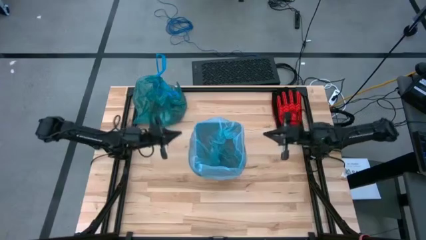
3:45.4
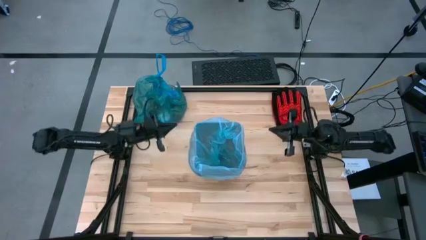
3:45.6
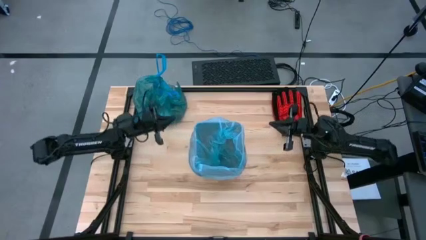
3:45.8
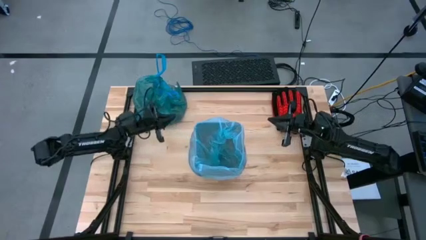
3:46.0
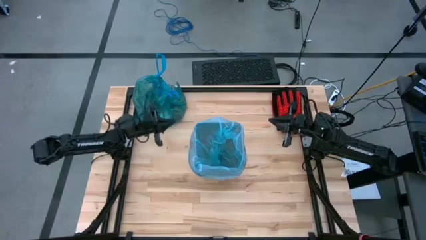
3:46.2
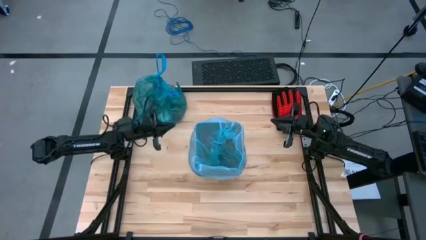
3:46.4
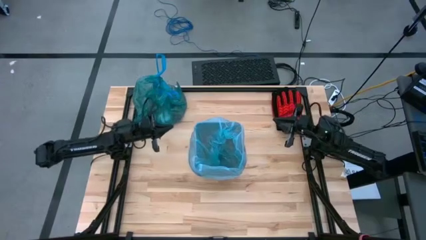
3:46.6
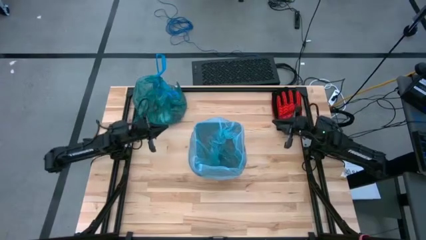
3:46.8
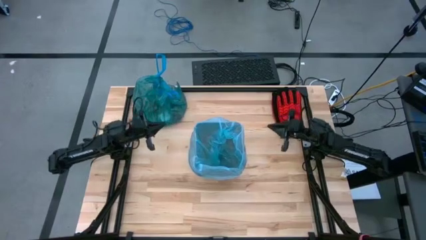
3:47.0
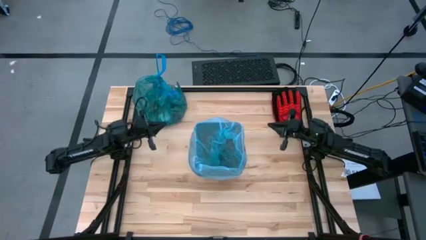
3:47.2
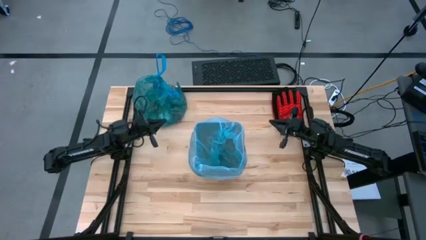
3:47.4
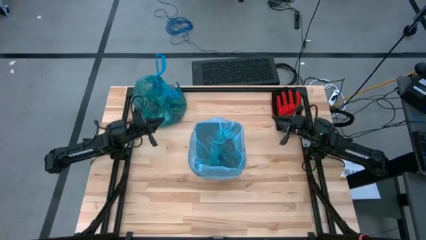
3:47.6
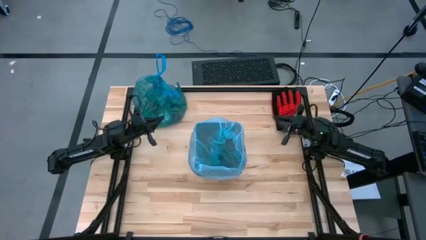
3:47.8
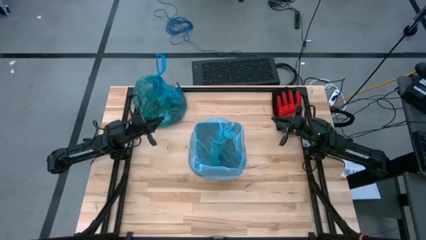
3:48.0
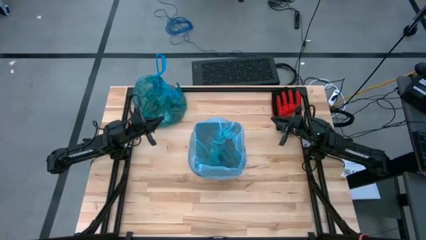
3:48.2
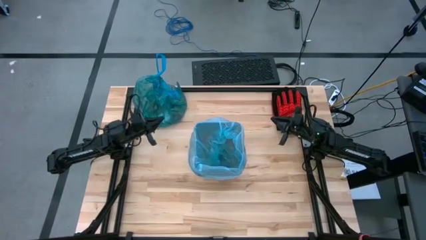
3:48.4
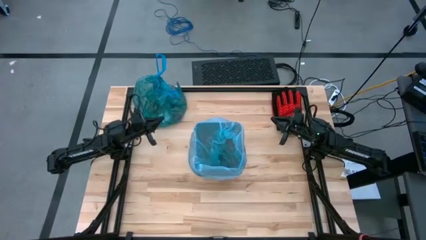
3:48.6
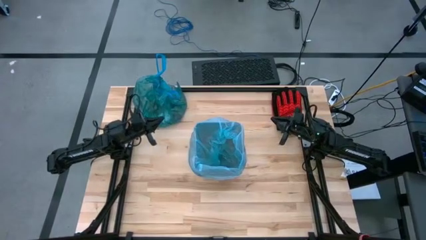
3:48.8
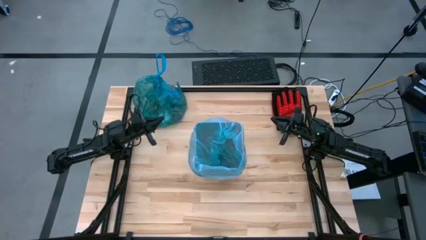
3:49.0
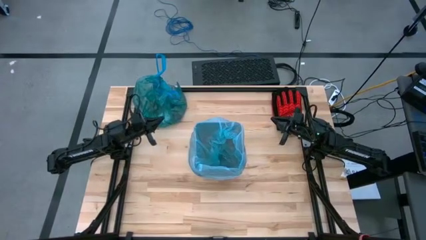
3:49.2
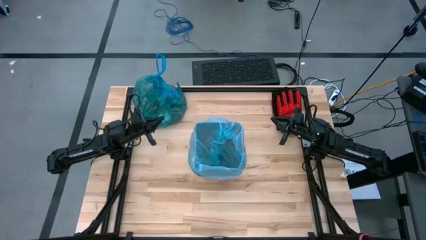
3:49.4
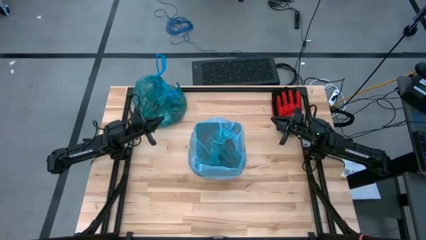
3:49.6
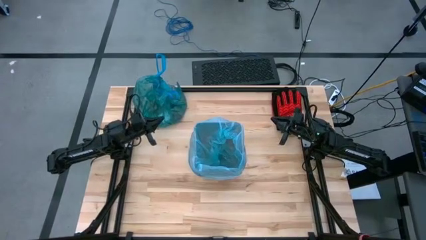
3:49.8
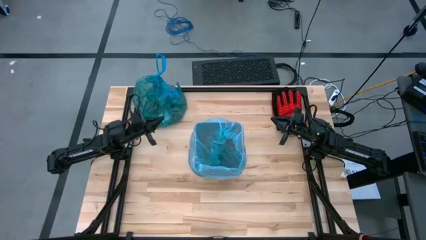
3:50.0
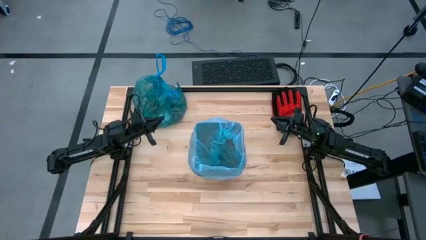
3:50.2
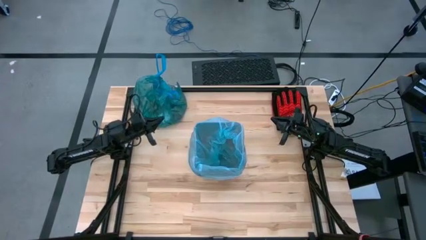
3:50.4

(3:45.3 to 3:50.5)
Task: place trash/remove bag and relplace
Return to Home Position

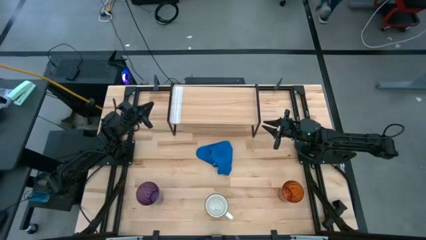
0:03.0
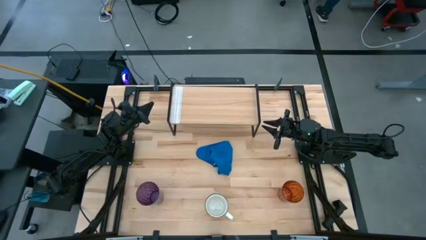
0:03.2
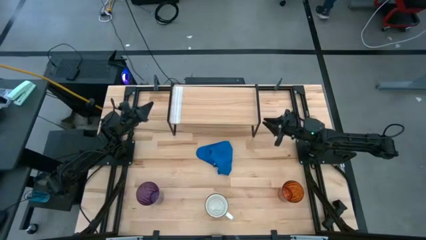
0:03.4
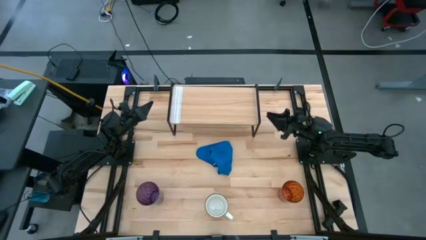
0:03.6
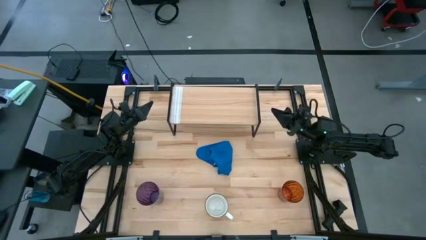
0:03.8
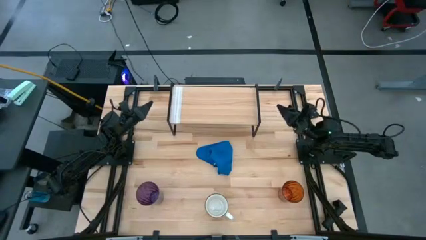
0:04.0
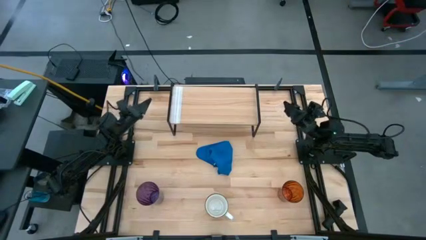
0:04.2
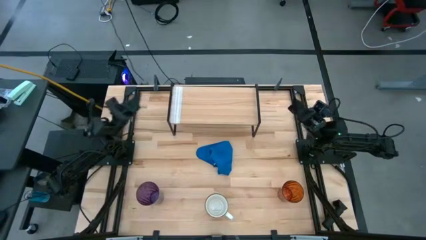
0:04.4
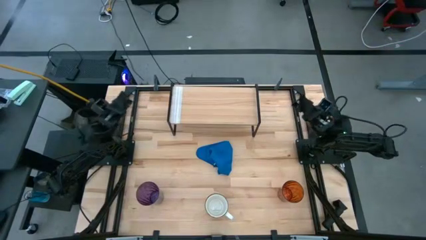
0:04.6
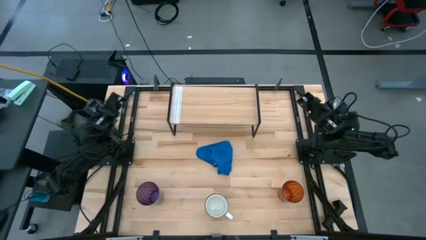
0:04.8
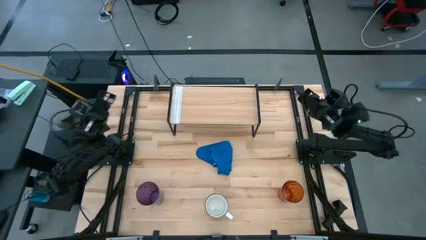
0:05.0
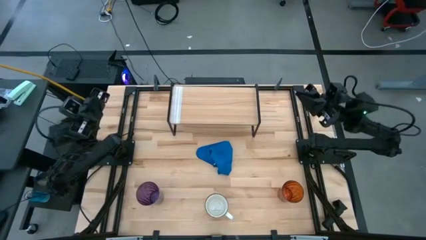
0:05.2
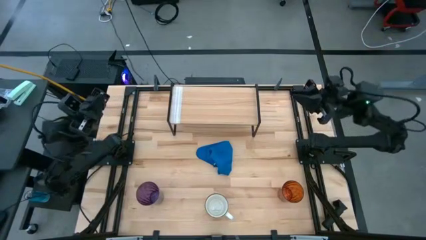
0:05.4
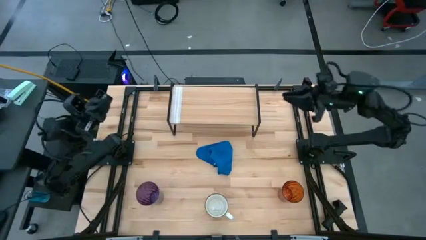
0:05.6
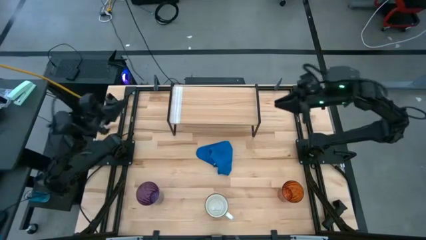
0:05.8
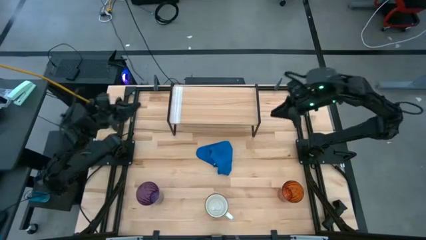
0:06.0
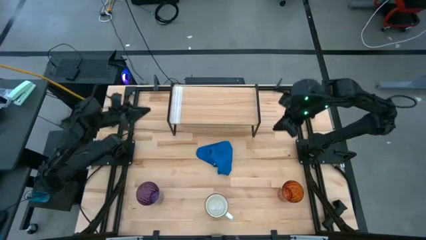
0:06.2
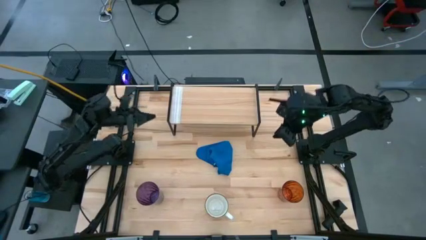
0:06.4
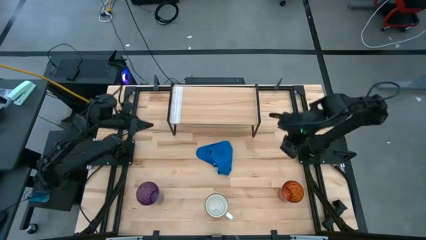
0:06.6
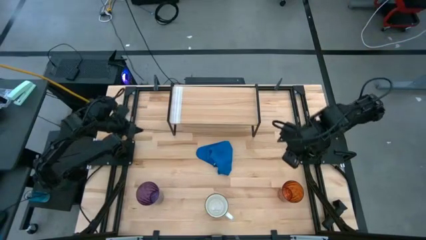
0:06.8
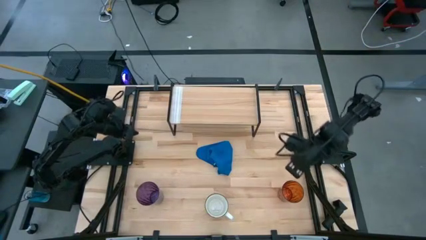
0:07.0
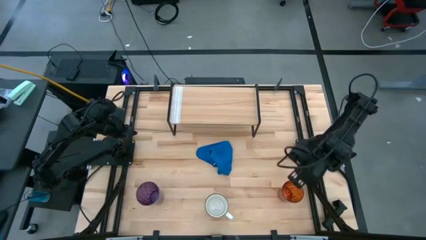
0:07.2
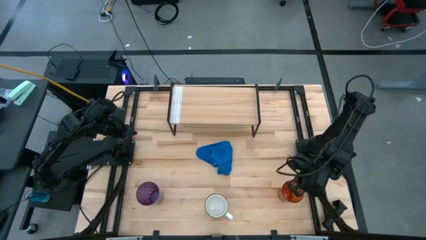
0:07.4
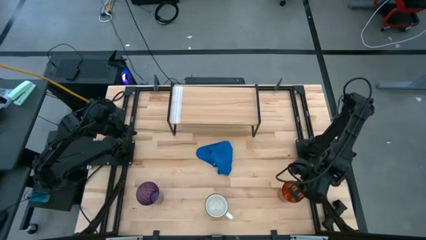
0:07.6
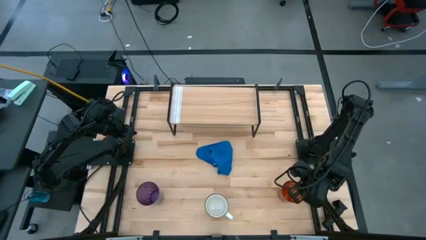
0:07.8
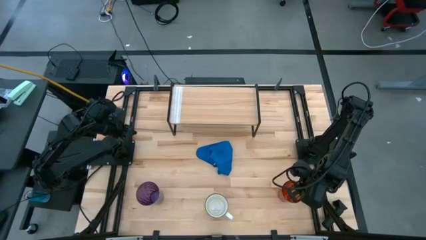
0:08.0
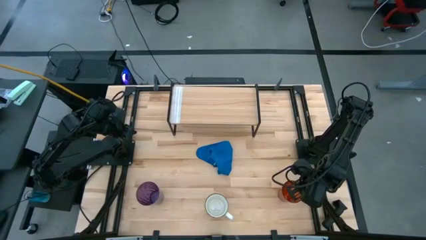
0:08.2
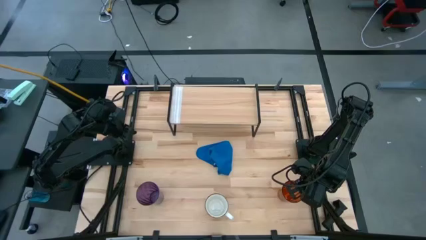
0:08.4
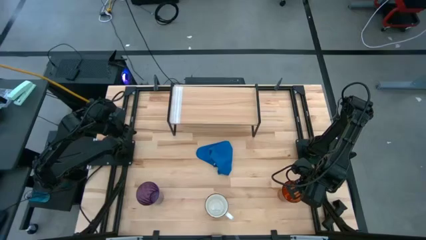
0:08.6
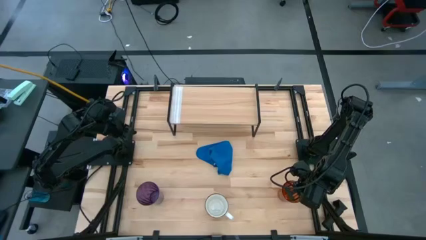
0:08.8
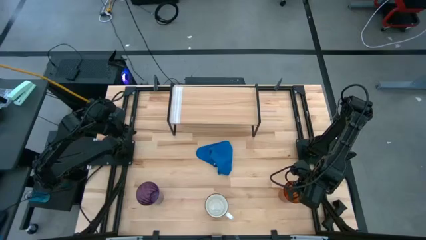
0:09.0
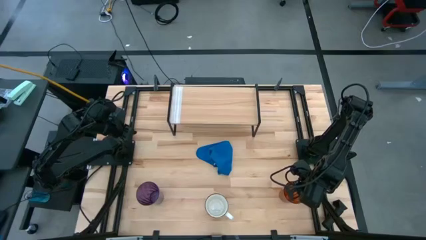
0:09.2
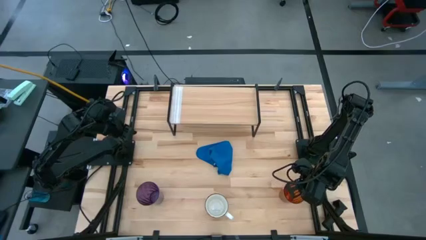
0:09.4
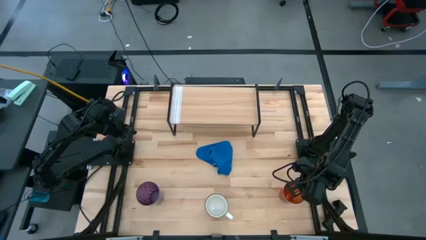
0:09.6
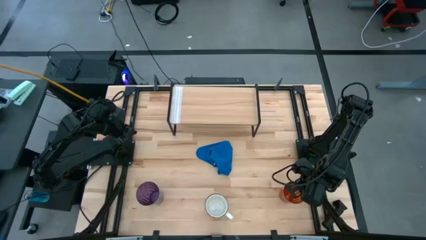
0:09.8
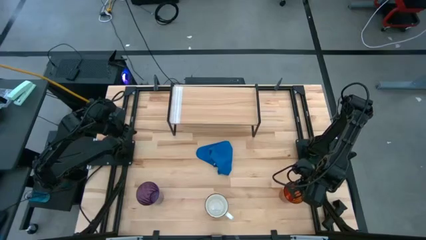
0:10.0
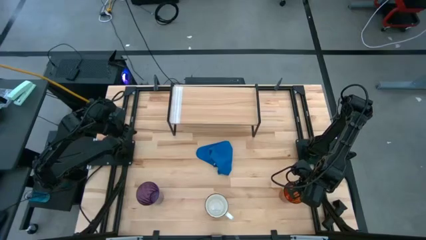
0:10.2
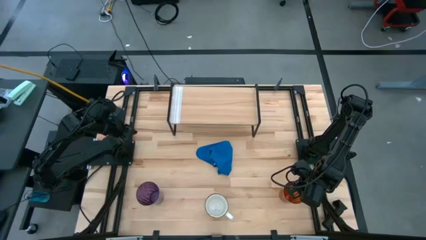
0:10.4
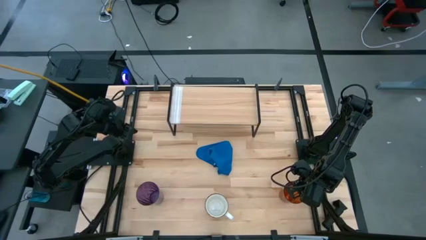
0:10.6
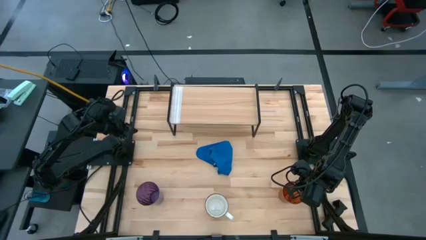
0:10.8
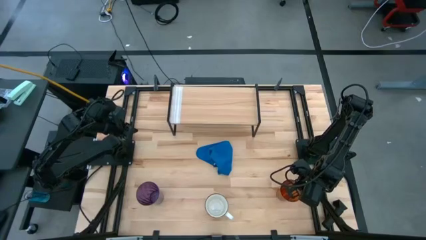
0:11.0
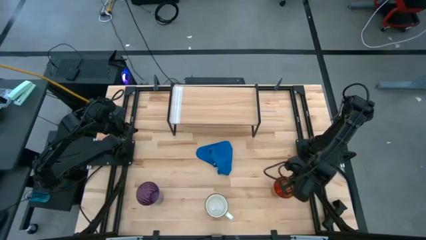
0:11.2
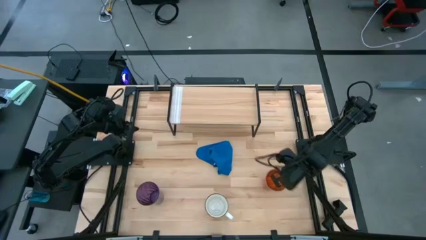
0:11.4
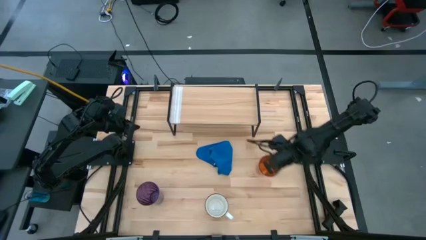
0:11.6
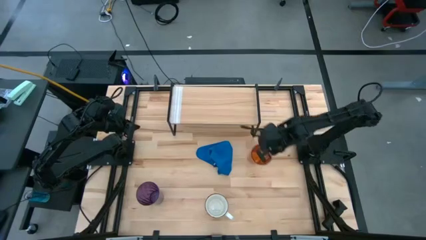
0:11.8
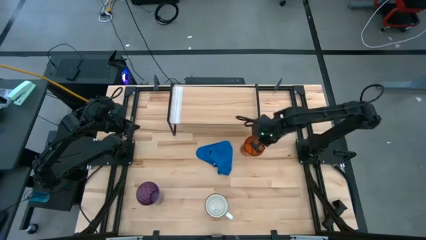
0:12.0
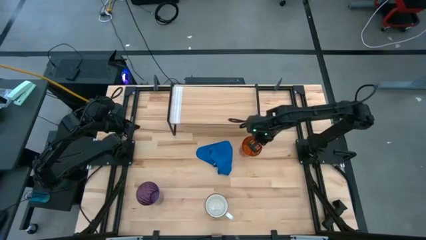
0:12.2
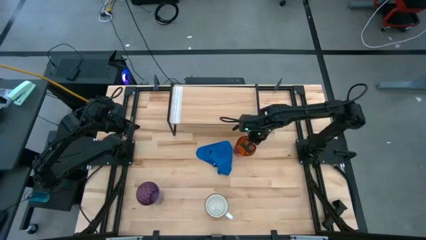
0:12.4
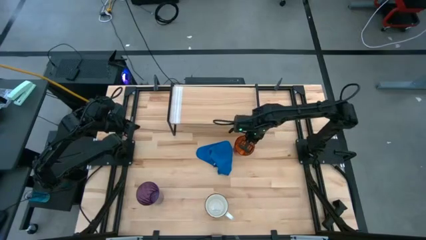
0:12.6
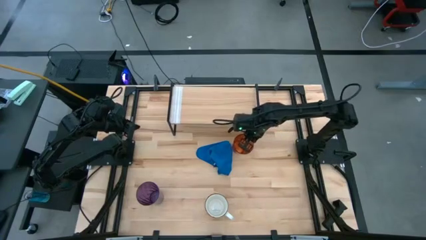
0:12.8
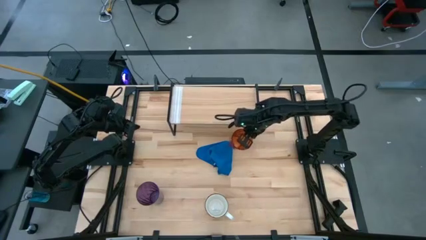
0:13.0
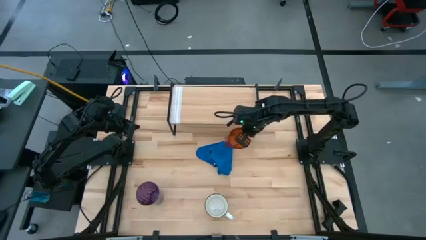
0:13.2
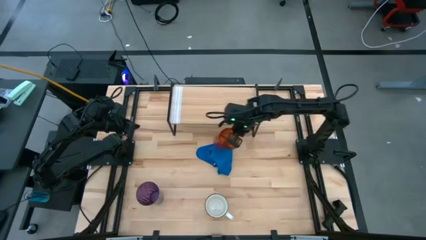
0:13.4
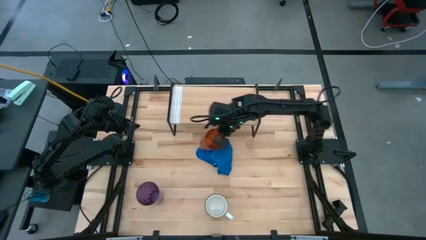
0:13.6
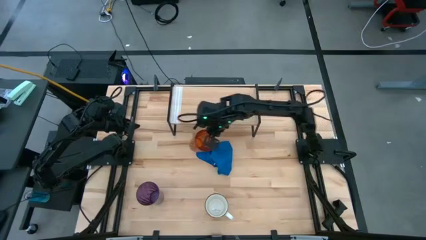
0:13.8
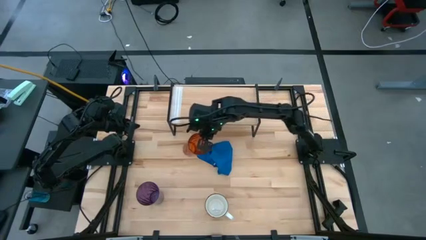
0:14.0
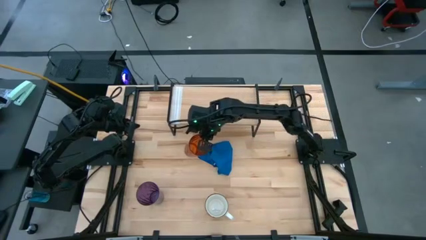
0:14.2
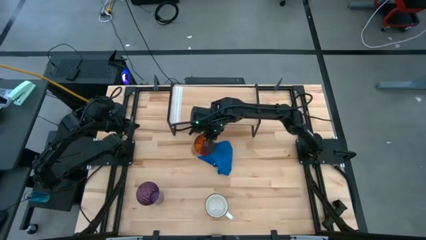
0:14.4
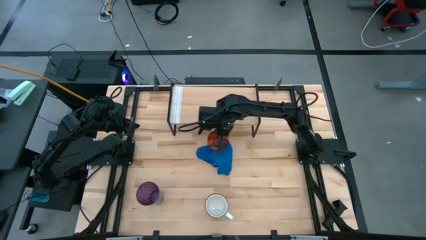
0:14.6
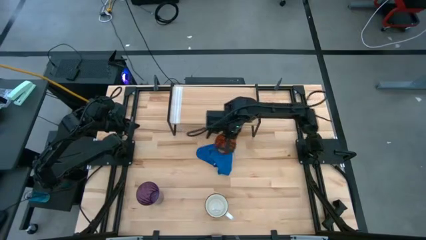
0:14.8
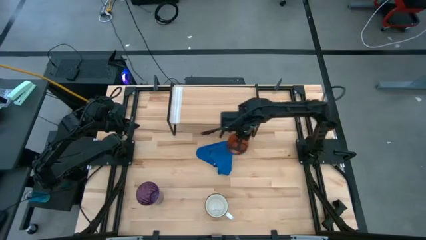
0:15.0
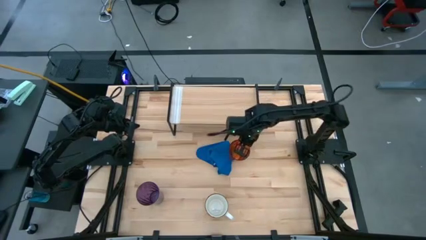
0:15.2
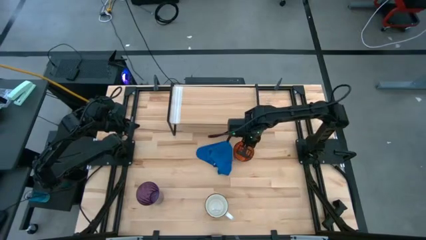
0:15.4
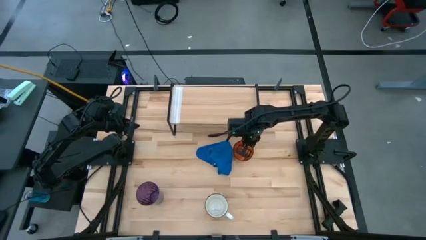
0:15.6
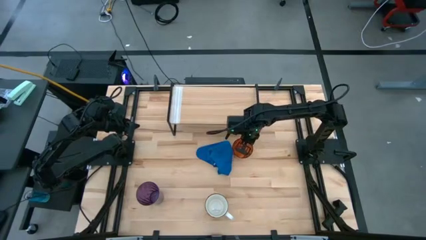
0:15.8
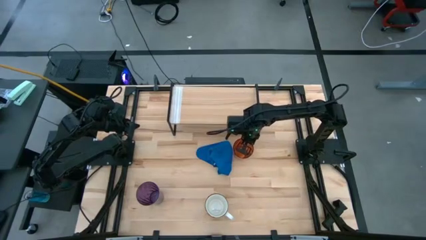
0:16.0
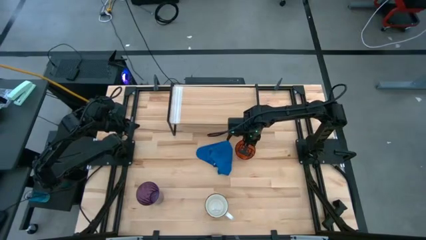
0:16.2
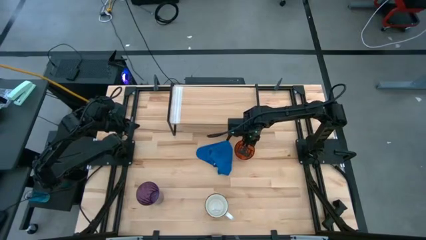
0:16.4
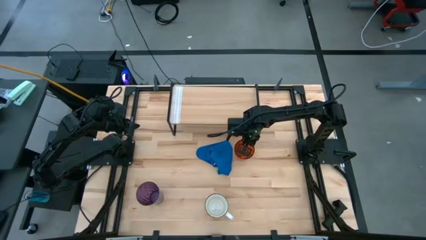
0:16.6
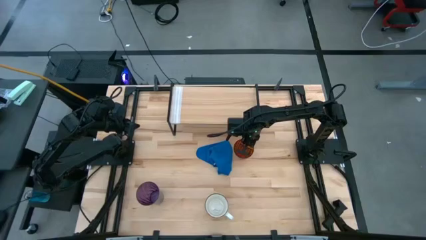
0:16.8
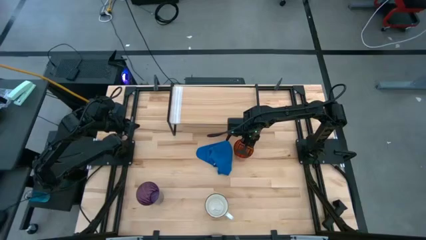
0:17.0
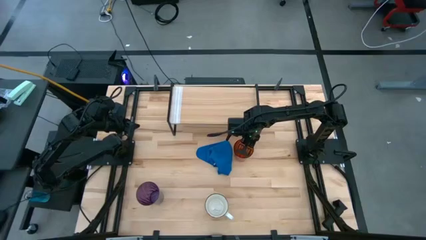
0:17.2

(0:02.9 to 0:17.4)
Task: Stack small to large cups/mugs on shelf
Move the orange glass to the middle of the table
